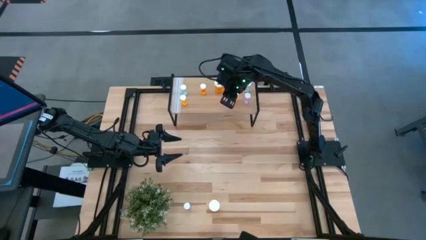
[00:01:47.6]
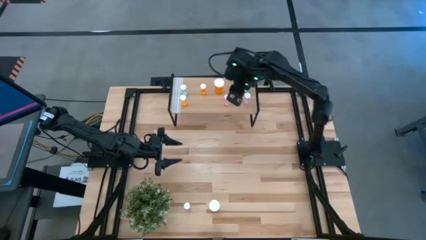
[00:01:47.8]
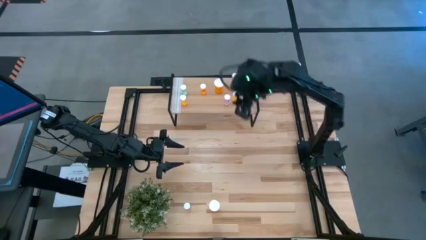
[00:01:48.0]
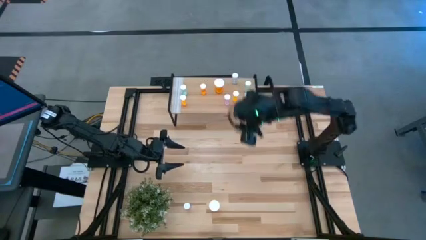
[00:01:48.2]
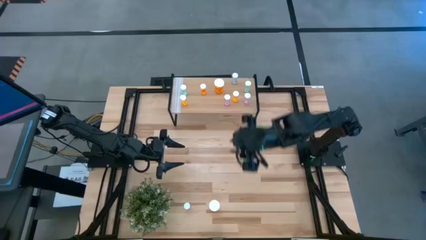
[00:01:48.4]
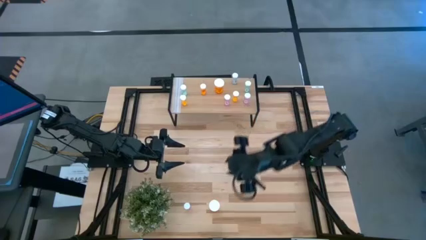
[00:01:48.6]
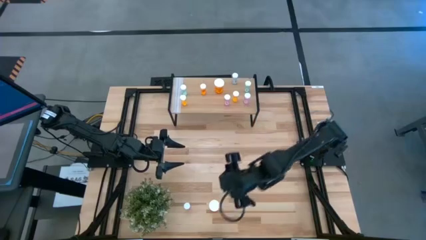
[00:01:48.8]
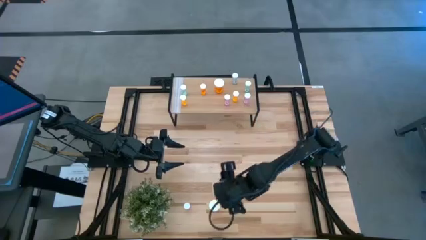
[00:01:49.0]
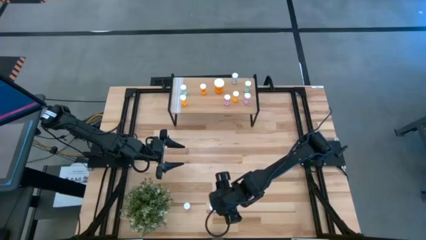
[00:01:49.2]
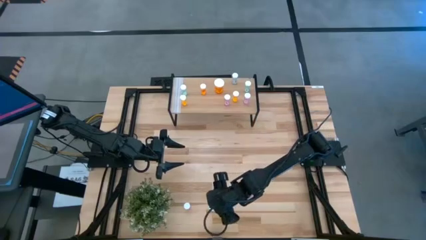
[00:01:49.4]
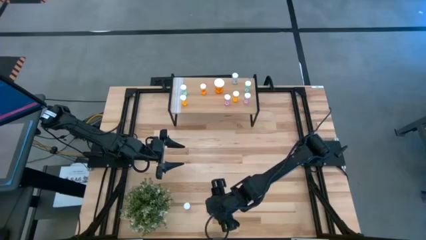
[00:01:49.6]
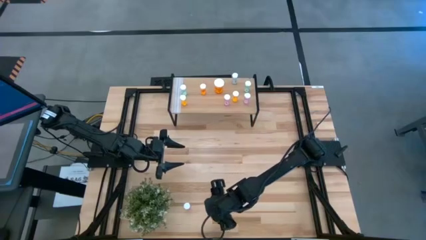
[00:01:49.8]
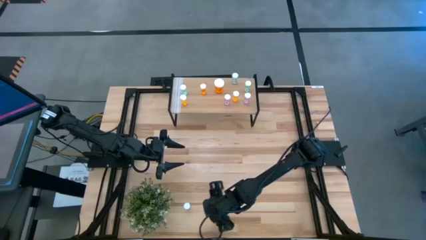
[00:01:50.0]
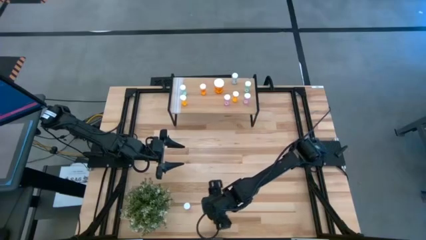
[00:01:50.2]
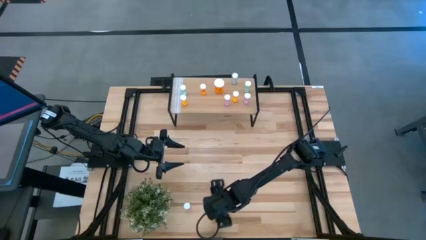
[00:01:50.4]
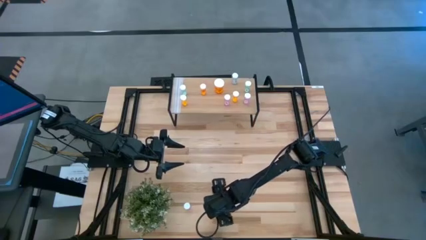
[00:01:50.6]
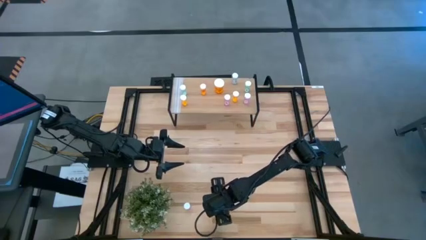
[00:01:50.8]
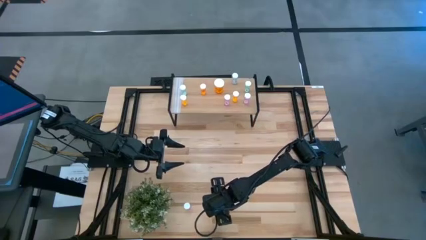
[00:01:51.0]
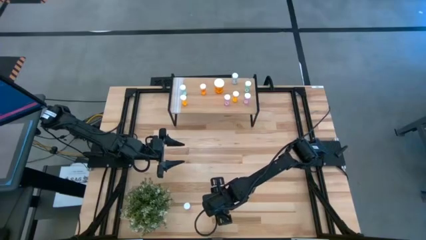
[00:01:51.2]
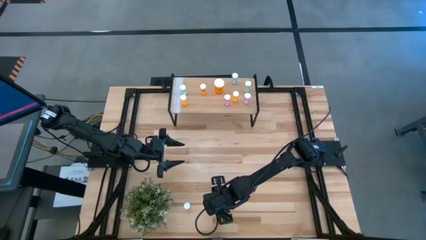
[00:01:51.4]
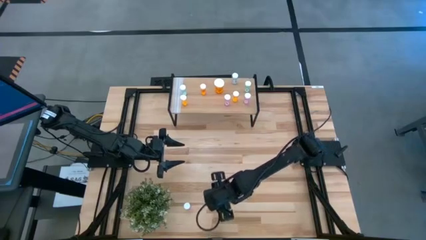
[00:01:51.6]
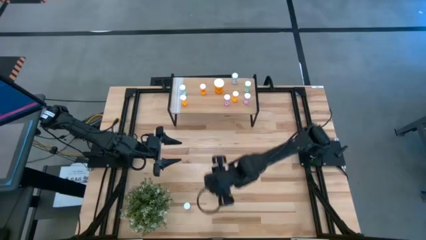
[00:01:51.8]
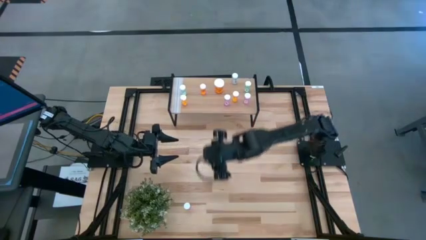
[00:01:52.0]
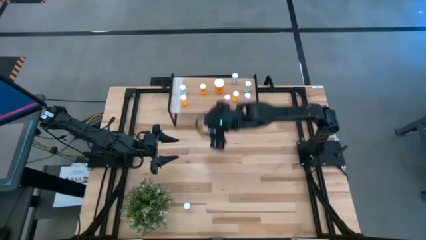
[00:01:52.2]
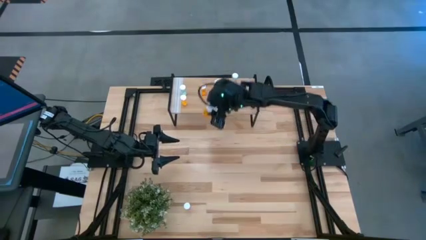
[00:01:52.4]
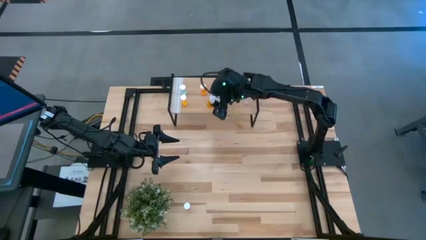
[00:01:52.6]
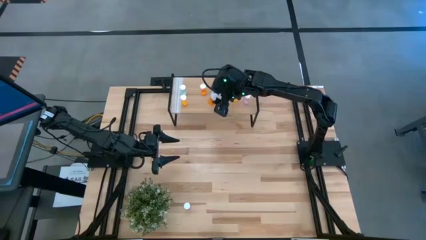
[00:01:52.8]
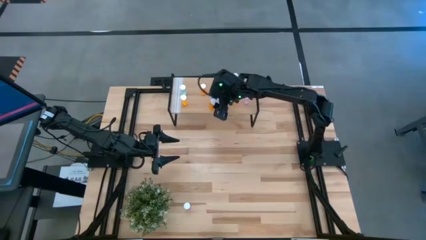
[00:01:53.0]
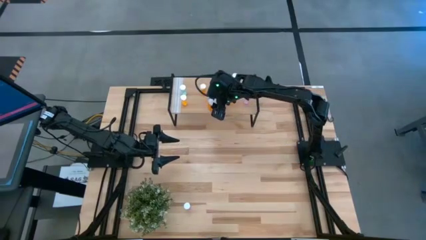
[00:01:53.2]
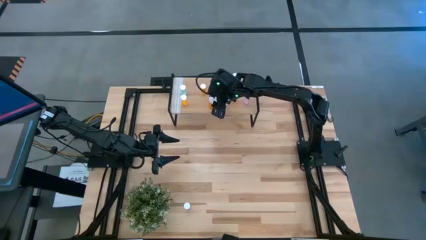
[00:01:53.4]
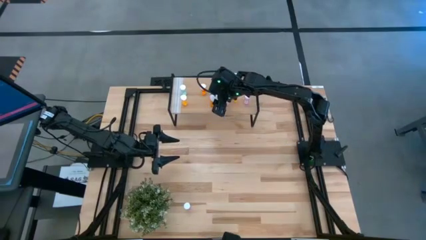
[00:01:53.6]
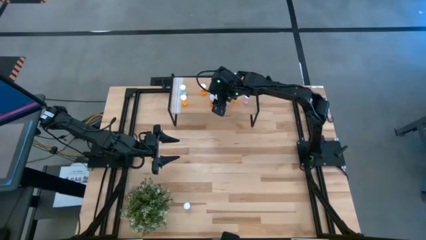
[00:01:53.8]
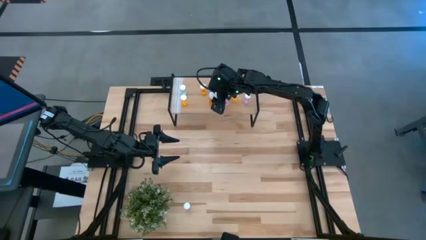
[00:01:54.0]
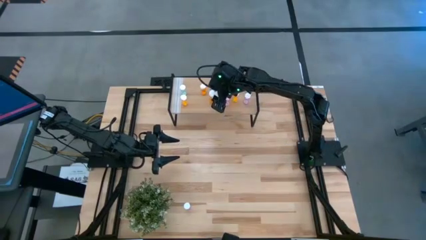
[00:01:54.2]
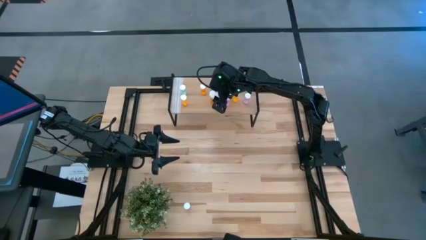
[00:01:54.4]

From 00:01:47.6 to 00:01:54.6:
Task: Pick and place medicine bottles onto shelf by color
Put the large orange bottle on the shelf

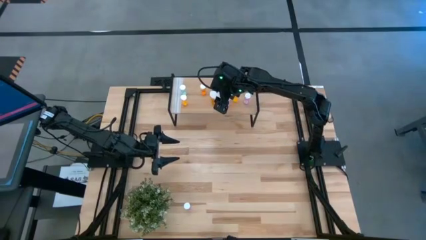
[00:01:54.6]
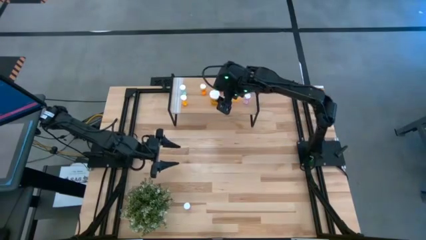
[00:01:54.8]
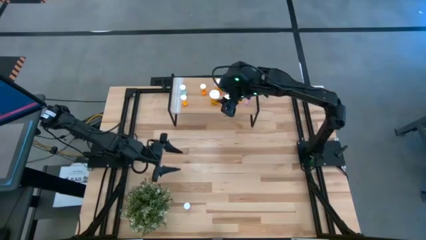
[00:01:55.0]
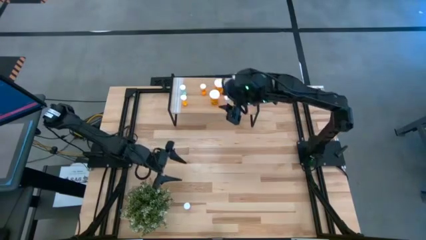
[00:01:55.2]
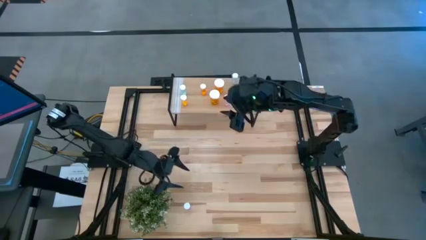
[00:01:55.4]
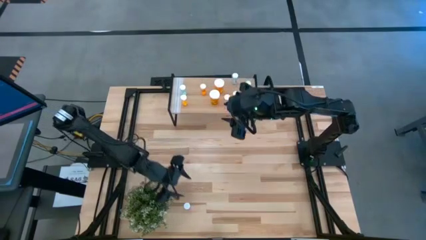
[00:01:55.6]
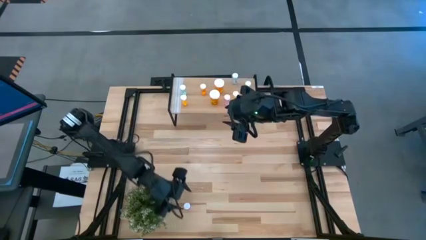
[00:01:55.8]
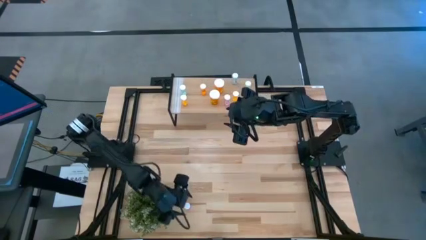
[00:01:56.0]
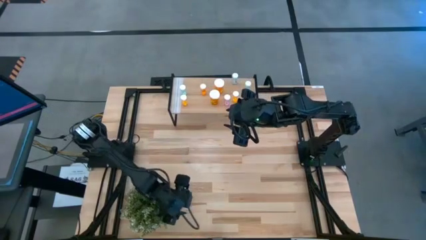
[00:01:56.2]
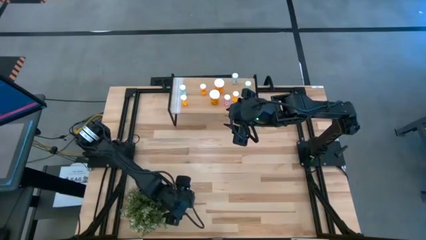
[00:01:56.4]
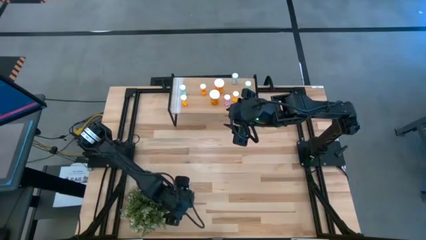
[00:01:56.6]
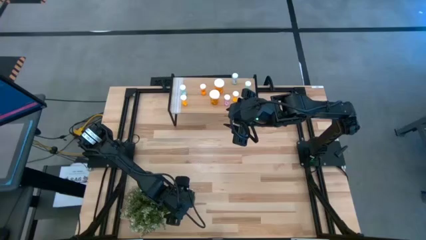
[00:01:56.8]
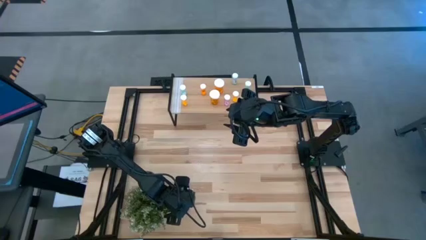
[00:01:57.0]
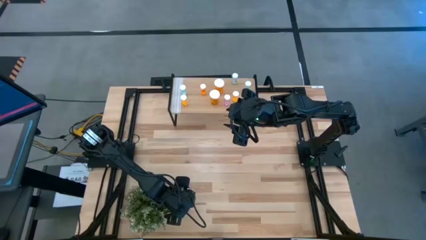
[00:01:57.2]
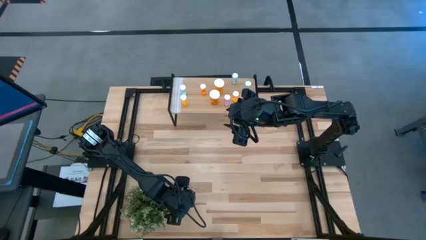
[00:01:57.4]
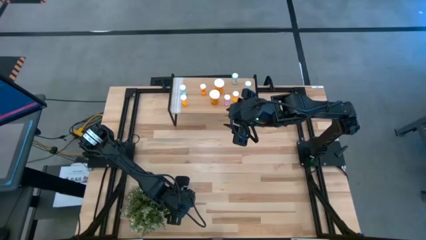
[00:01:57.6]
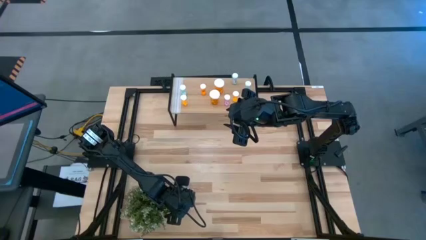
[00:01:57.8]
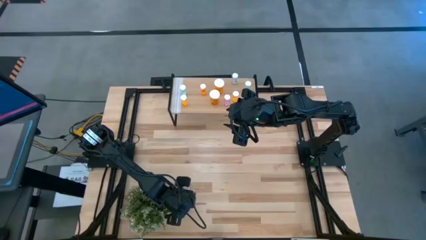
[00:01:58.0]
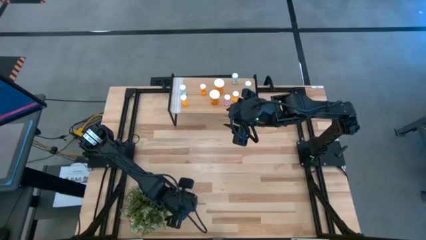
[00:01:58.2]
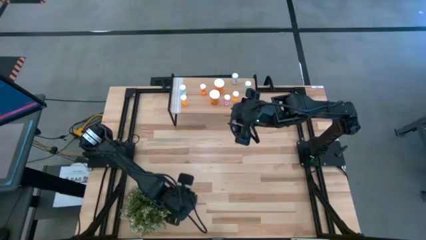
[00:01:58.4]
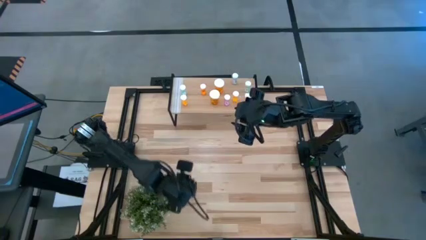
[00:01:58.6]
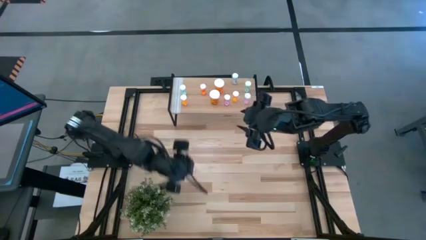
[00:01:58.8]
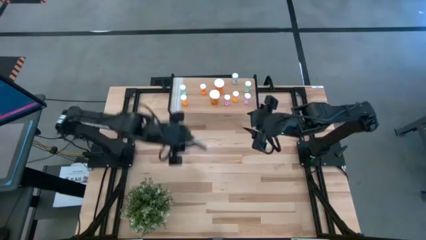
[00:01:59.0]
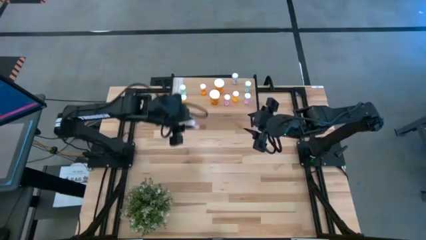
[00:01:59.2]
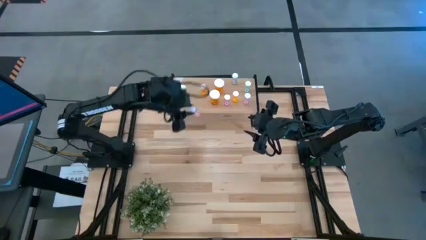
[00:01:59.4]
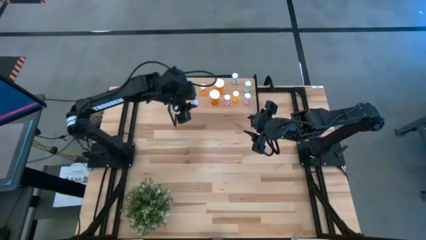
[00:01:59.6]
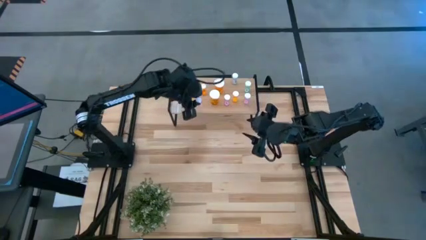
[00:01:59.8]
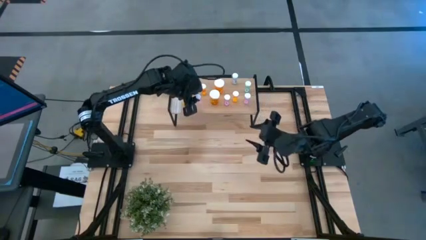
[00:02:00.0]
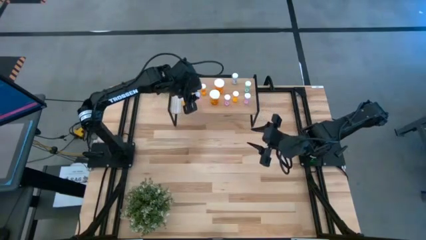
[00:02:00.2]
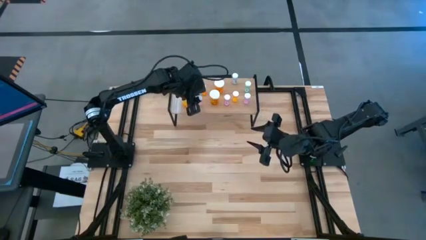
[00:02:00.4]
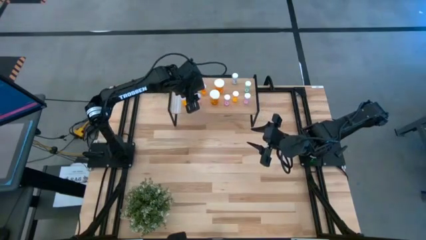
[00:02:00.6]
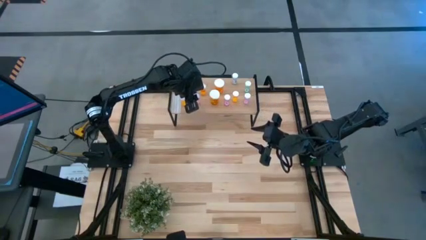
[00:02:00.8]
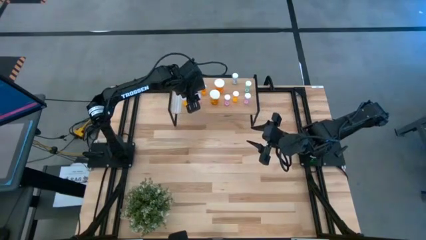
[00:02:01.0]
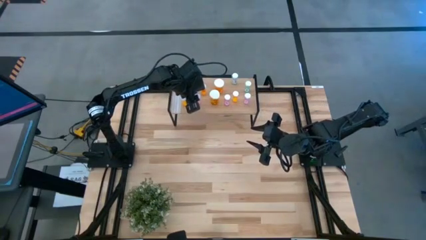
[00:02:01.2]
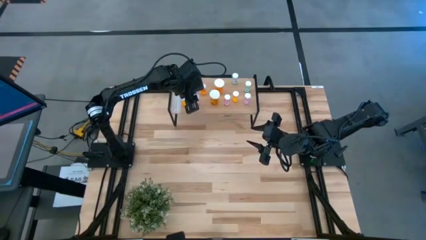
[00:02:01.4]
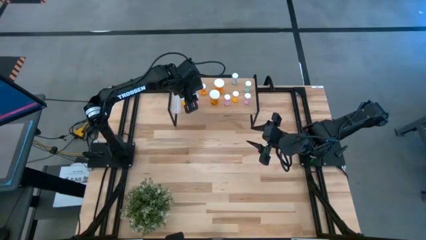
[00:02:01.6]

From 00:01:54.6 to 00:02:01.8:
Put the violet bottle on the shelf

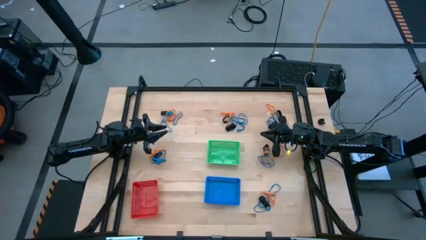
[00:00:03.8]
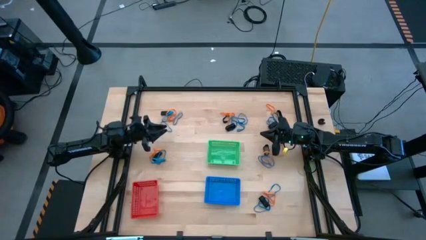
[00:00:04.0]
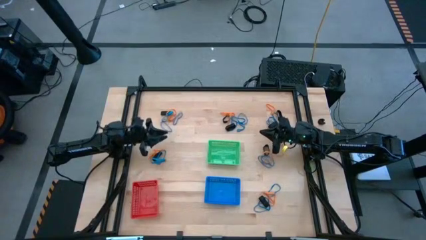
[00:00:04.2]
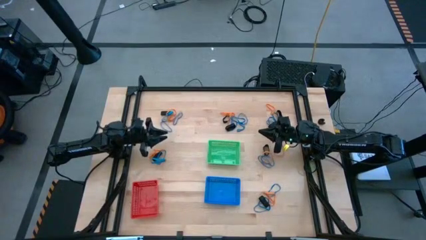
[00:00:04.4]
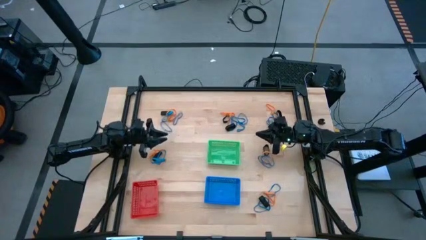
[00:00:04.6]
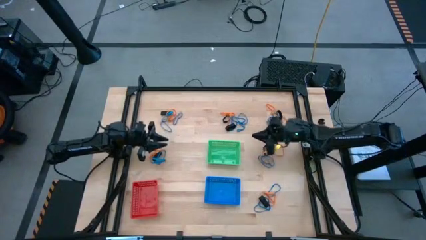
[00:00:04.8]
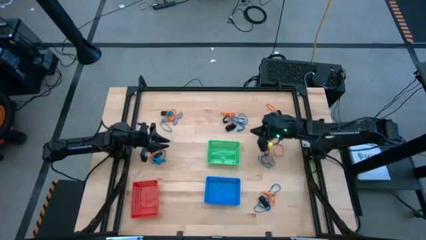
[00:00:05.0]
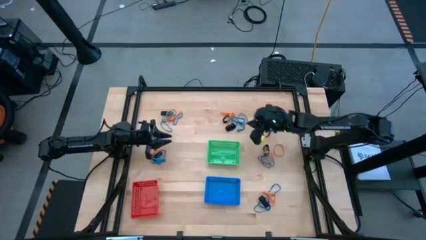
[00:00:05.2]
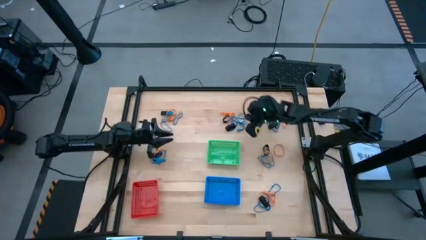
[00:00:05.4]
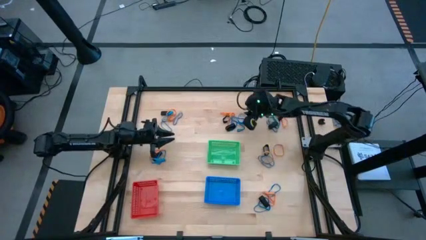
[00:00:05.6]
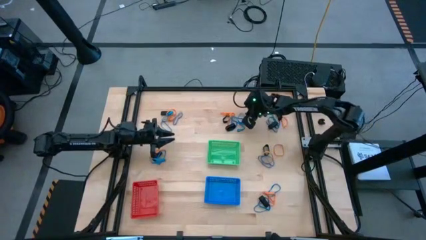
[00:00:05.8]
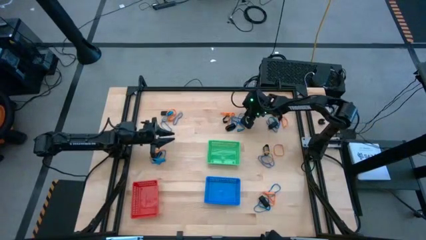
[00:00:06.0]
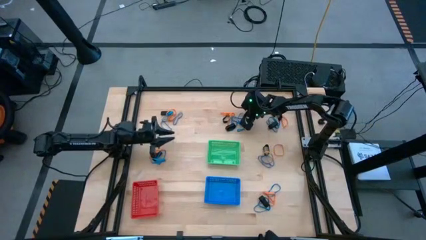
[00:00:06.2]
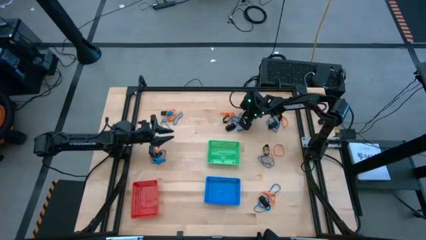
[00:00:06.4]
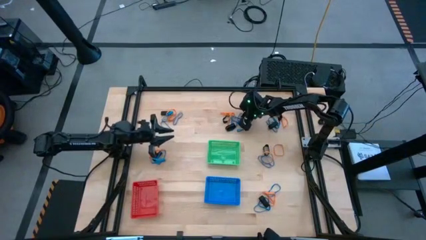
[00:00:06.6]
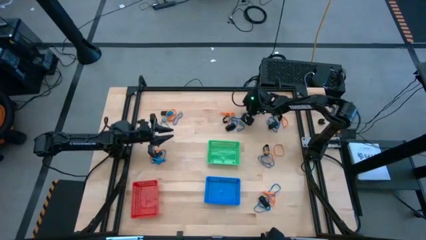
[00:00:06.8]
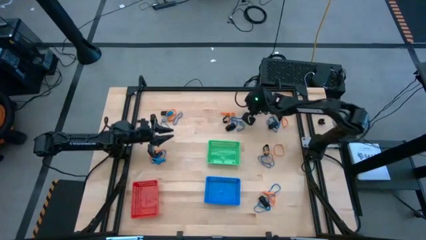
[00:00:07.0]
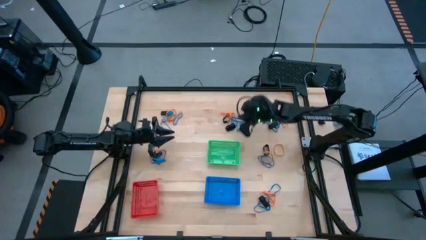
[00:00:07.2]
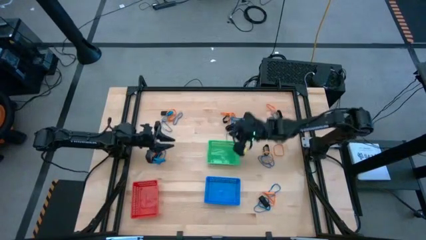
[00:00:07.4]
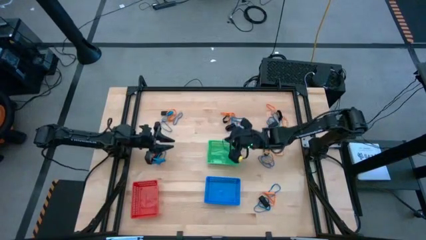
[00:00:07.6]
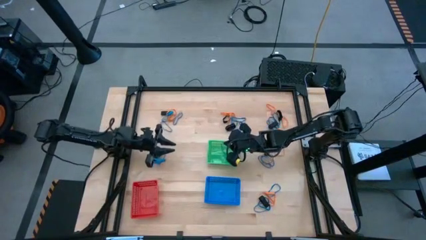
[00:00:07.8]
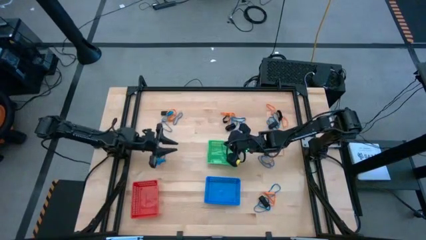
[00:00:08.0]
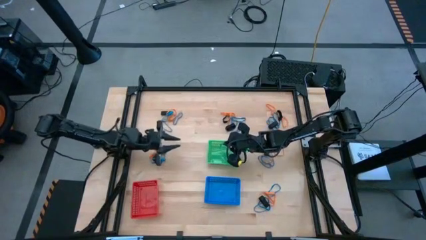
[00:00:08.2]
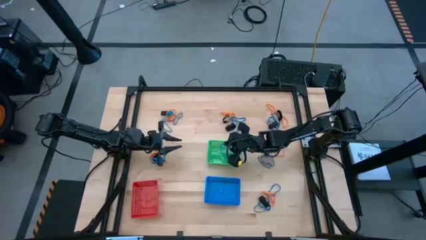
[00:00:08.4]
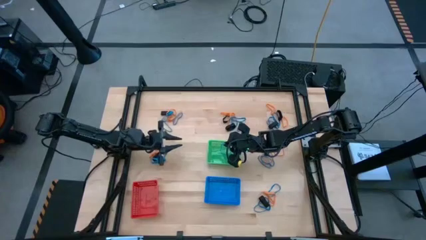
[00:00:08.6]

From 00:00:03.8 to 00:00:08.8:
Task: Sort rubber bands into baskets
Put the blue rubberband into the green bin
